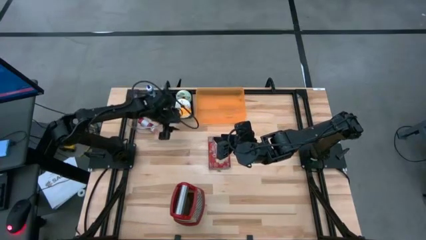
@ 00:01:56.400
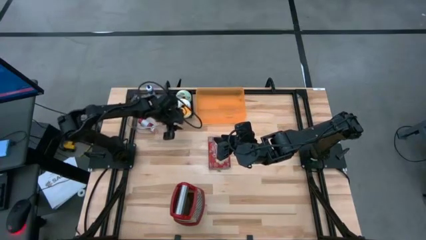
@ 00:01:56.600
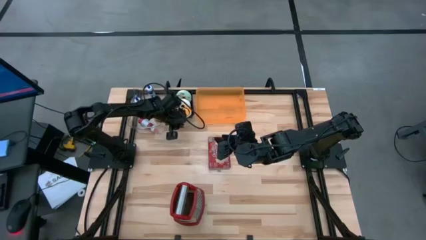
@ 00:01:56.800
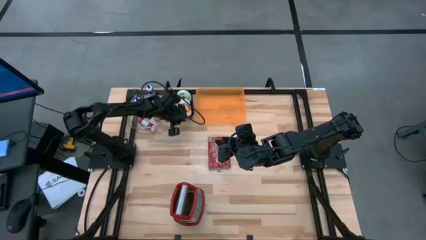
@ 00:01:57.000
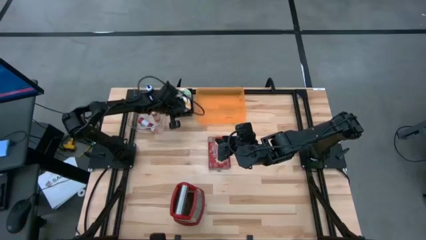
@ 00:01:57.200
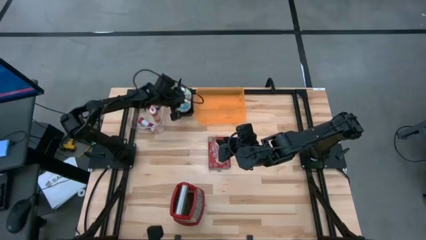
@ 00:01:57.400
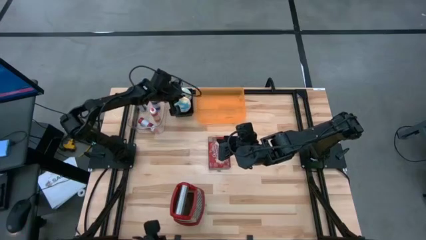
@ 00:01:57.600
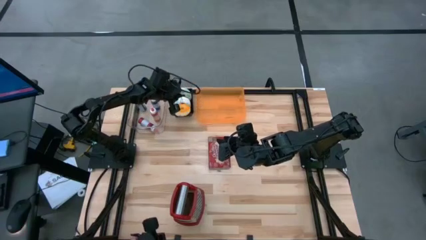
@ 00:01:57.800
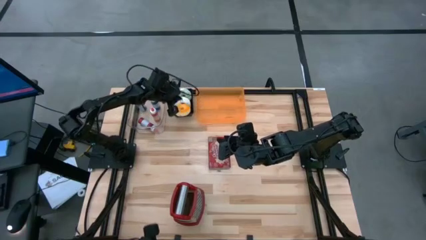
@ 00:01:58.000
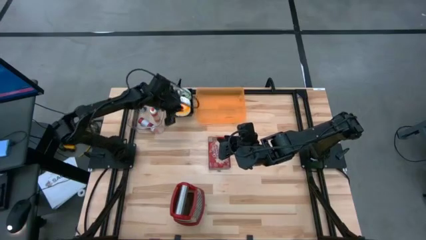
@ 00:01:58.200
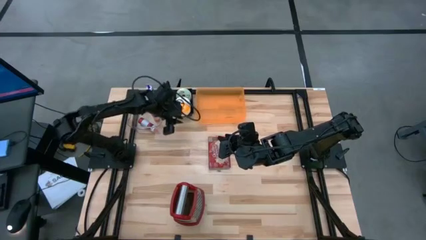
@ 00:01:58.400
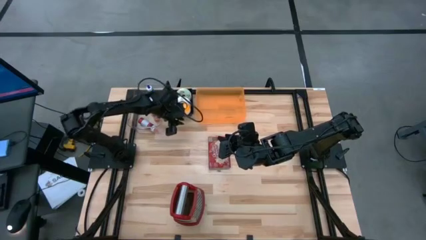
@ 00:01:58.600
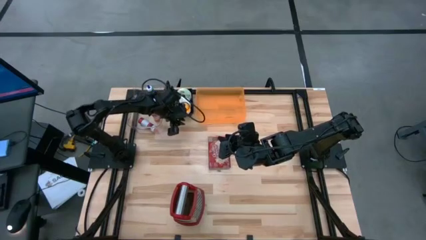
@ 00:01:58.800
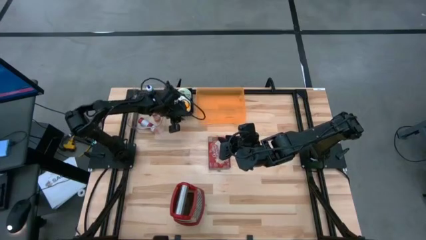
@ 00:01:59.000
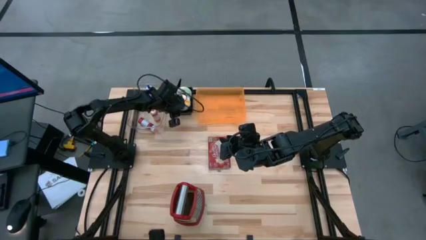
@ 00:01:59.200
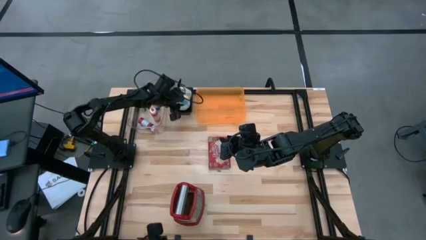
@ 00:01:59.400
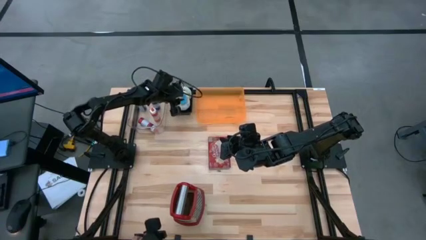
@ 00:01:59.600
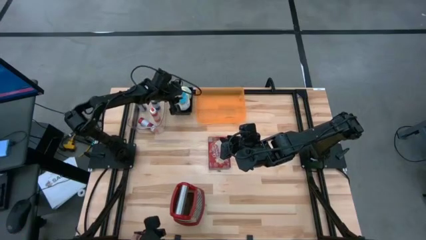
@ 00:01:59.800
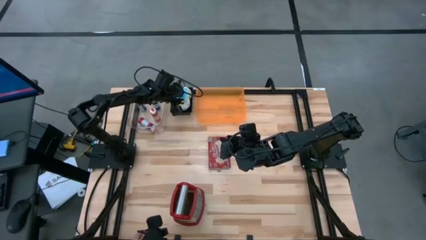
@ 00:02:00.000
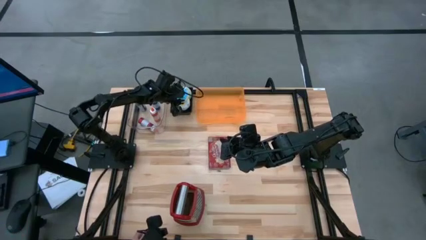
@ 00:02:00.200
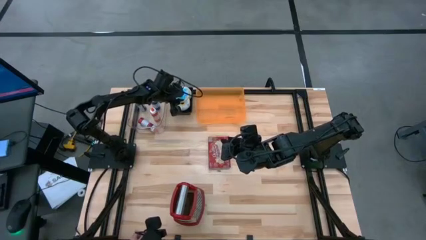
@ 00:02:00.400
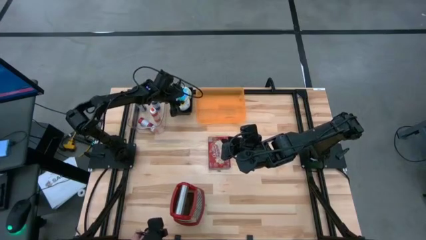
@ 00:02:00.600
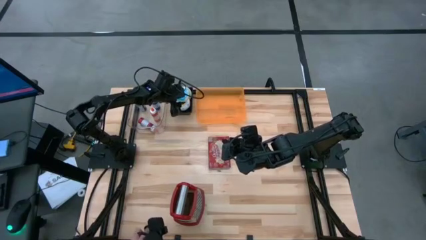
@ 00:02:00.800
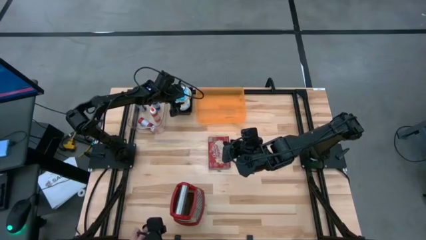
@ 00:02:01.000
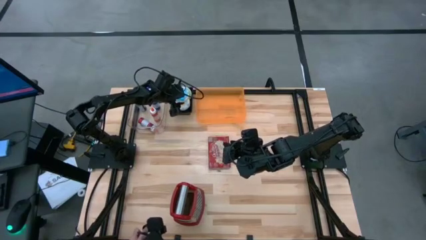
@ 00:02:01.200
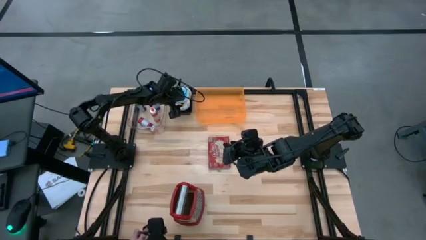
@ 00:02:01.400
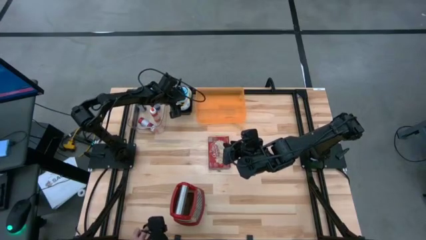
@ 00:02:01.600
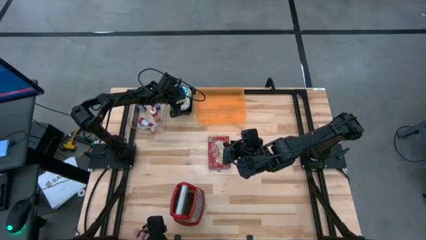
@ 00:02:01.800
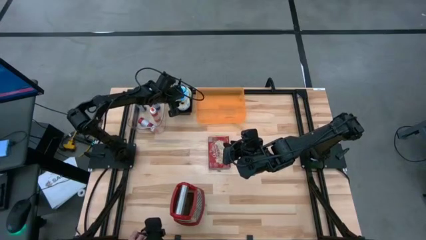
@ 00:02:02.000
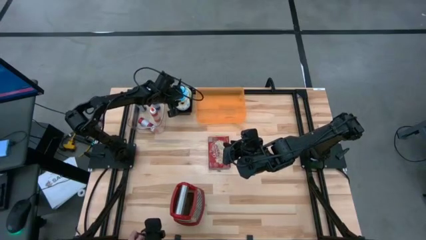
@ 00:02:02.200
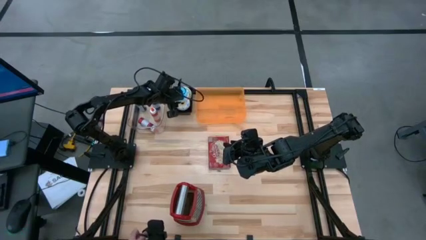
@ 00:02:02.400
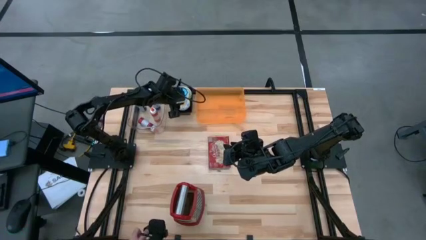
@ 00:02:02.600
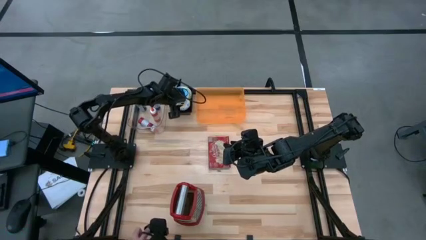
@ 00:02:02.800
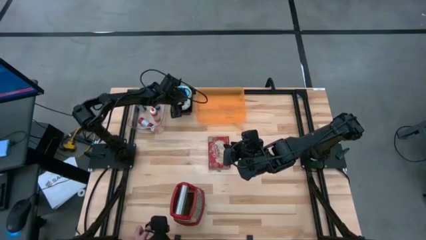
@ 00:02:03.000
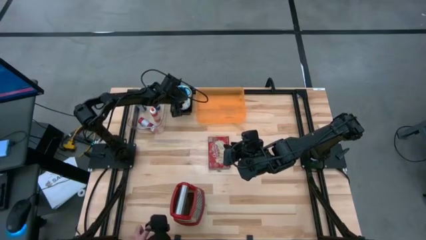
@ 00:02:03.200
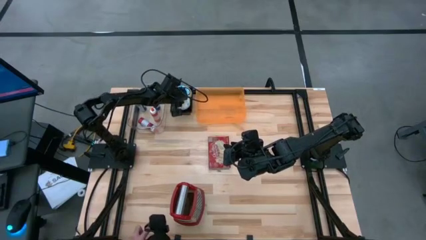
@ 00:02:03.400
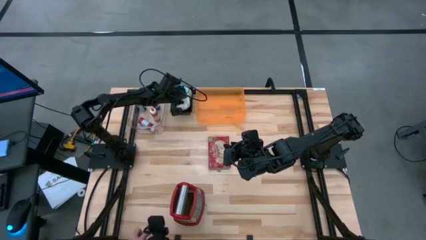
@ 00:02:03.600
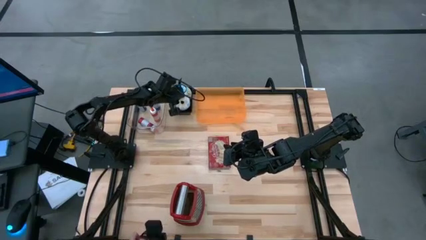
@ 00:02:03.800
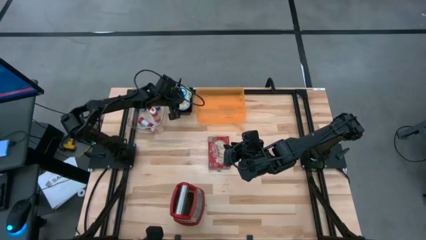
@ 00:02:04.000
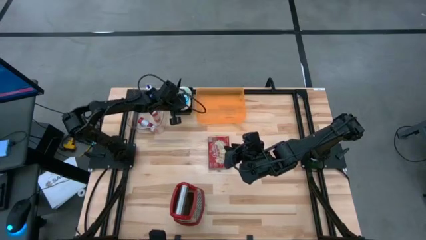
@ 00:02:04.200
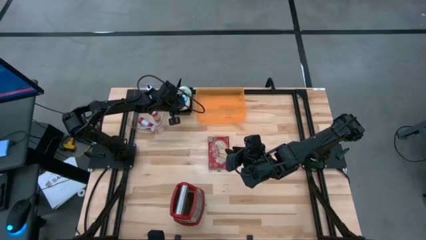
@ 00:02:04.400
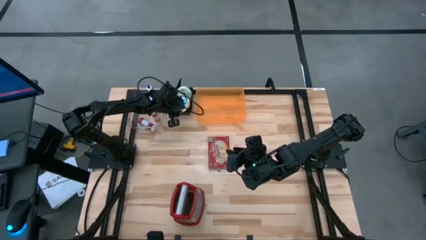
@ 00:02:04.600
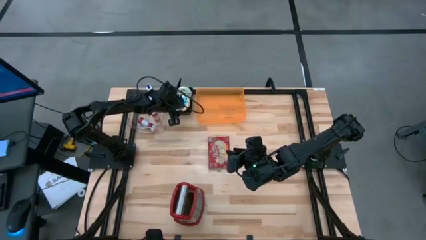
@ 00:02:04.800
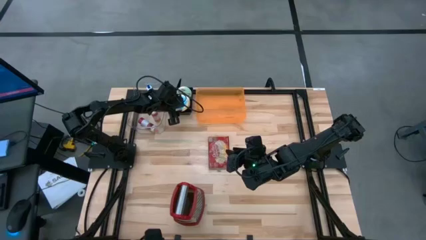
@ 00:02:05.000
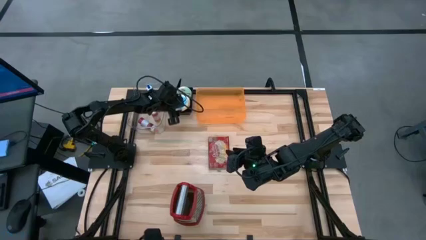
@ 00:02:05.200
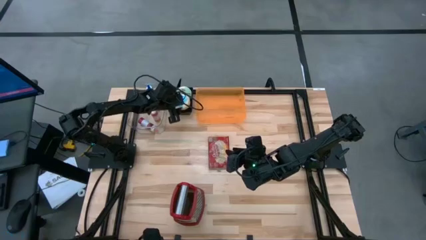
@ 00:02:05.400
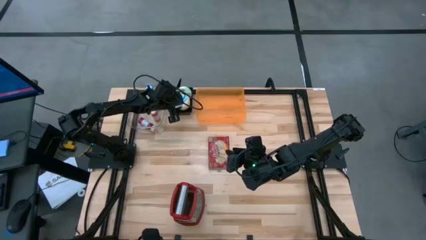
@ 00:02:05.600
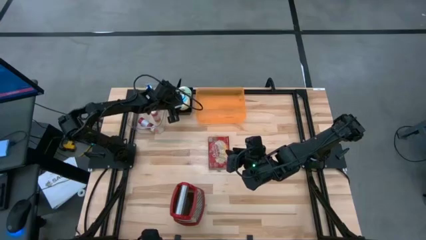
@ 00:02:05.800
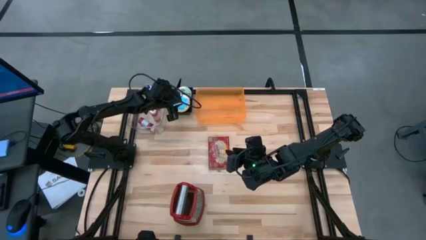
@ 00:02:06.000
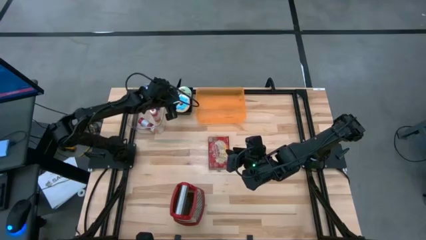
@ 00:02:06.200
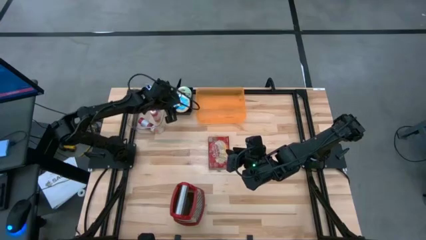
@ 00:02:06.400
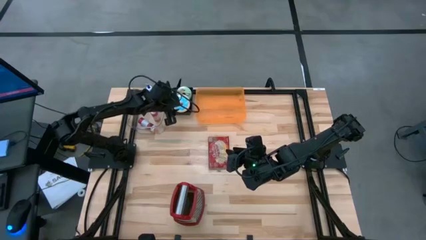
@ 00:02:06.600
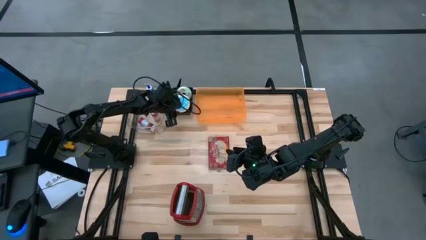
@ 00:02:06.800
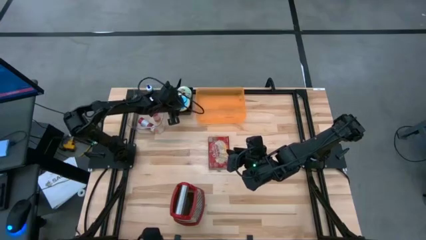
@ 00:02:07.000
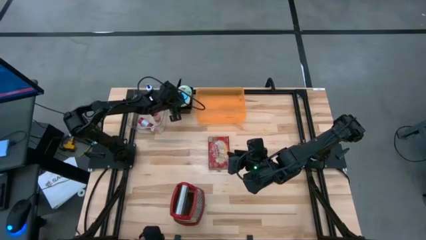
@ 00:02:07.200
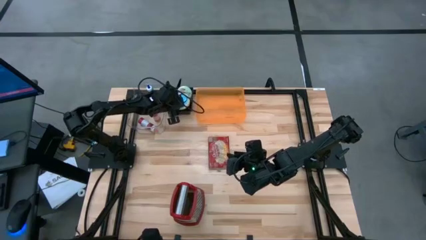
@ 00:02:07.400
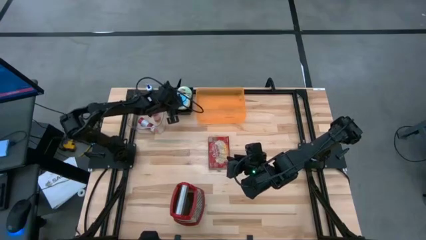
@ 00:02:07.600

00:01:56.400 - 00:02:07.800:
Put the blue donut into the black bin

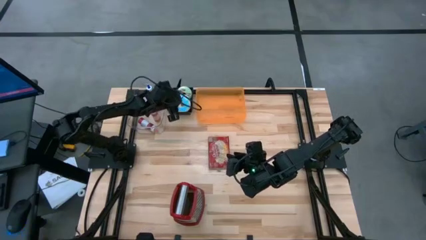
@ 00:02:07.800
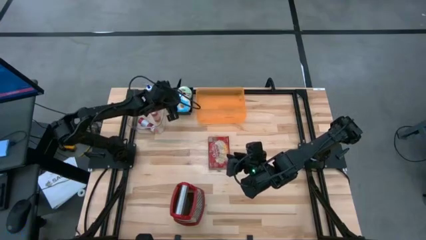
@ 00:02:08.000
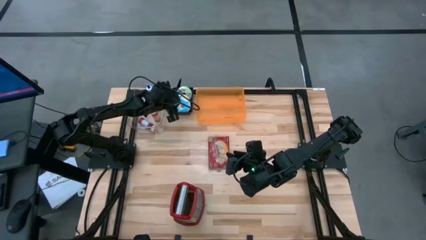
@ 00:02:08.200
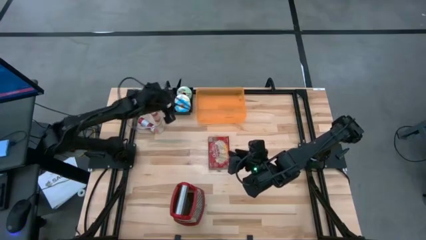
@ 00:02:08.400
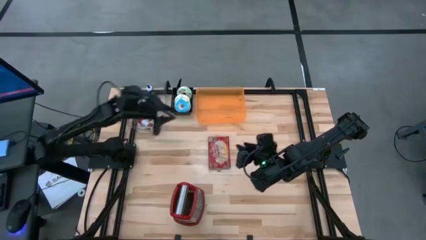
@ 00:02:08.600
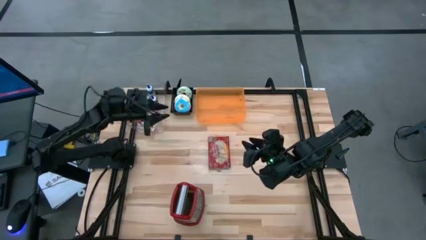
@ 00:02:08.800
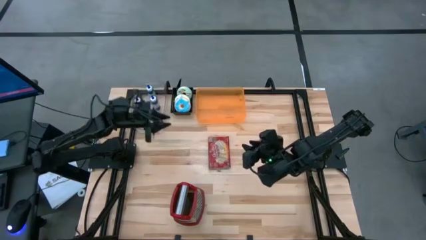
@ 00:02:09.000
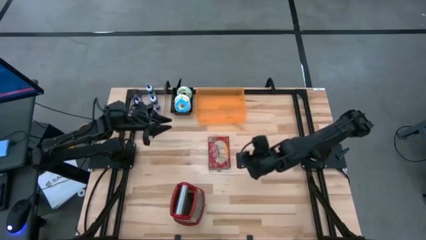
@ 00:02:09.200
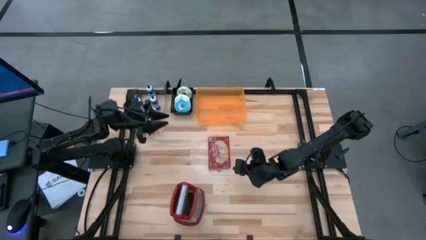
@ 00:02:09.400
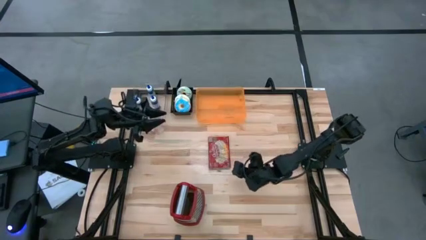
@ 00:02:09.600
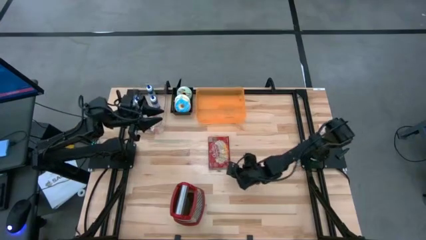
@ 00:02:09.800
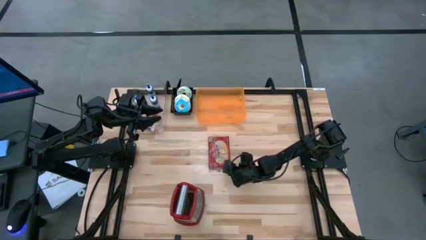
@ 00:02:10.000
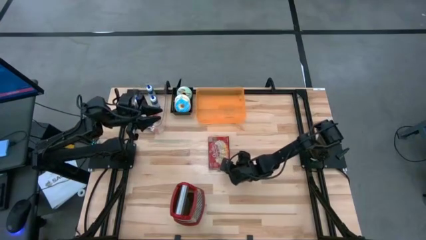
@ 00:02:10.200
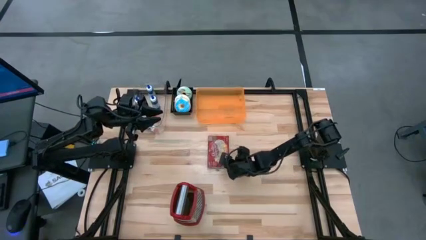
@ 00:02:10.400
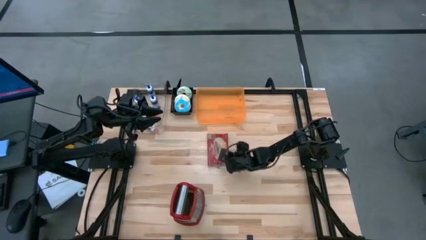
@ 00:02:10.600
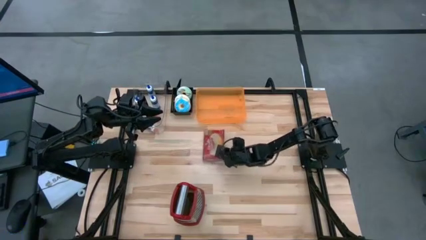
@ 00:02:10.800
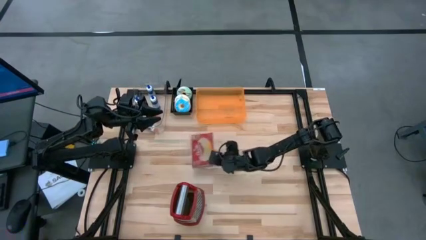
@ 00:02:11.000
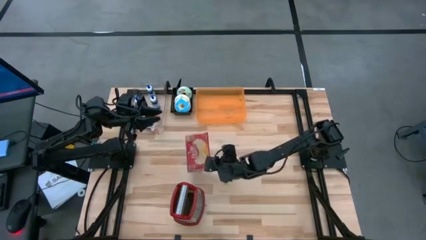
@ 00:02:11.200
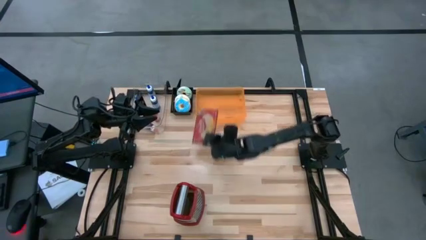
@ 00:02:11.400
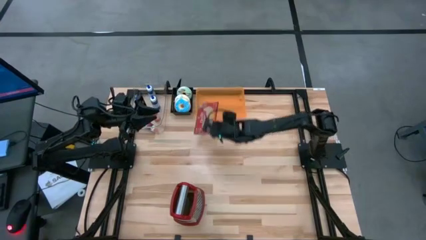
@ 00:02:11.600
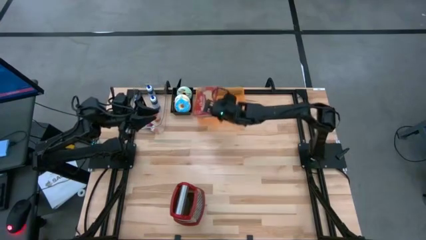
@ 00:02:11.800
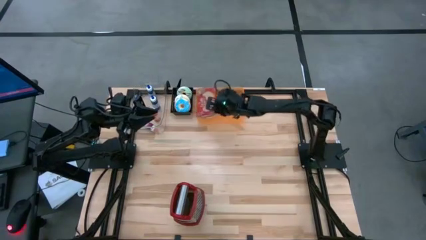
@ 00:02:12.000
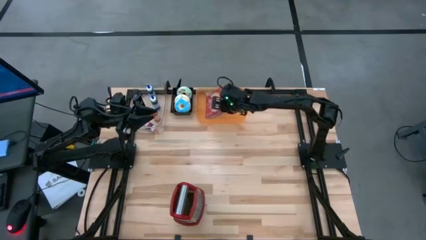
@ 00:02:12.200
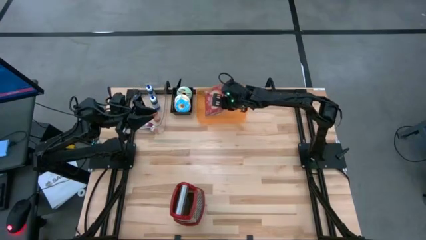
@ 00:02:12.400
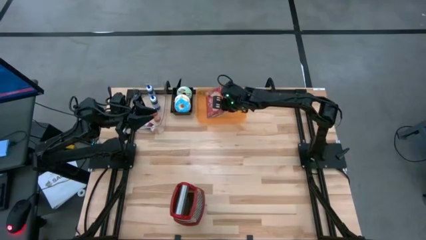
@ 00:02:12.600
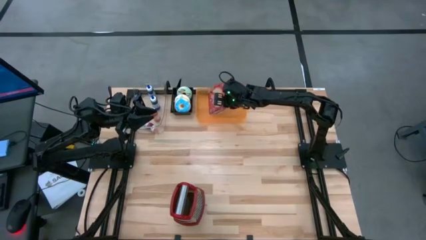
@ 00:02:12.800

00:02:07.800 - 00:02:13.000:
Put the red popcorn bag into the orange bin
